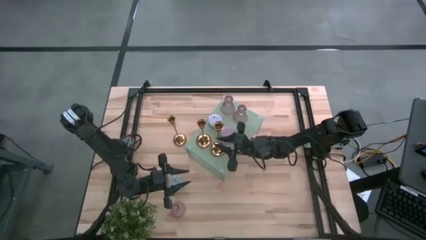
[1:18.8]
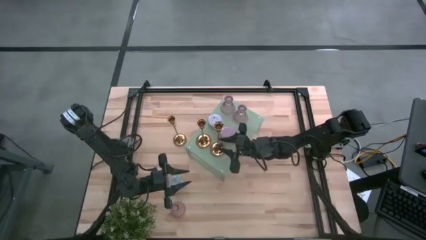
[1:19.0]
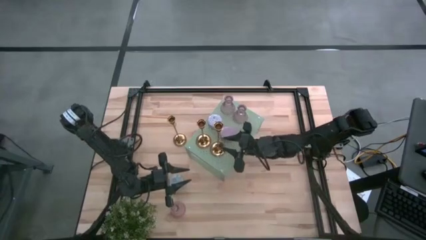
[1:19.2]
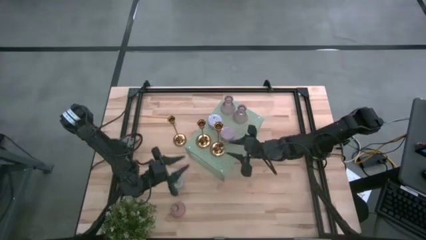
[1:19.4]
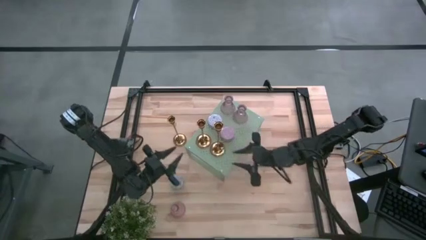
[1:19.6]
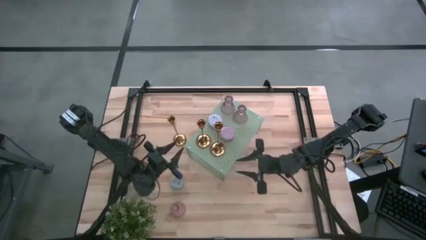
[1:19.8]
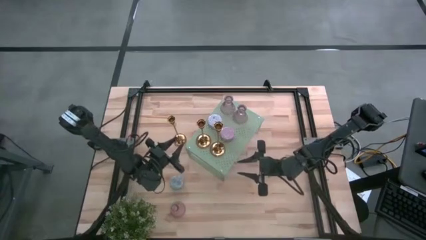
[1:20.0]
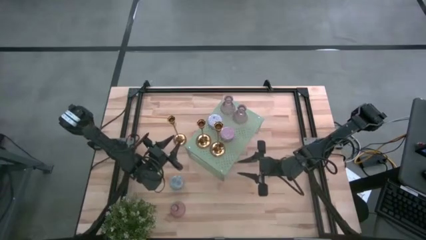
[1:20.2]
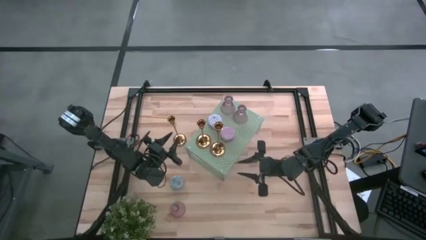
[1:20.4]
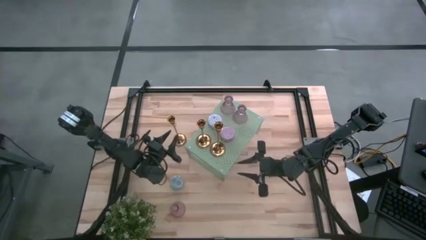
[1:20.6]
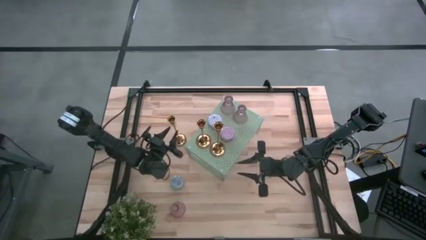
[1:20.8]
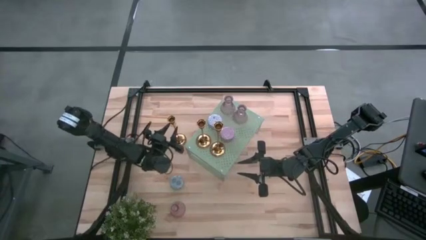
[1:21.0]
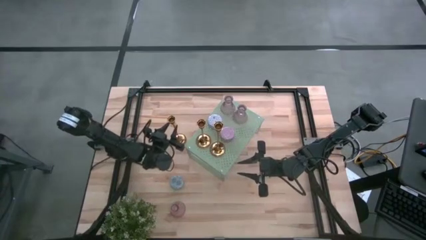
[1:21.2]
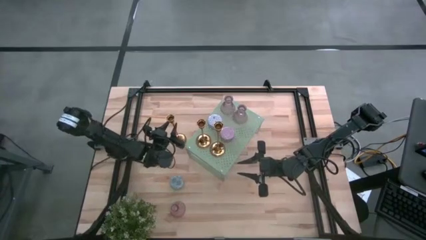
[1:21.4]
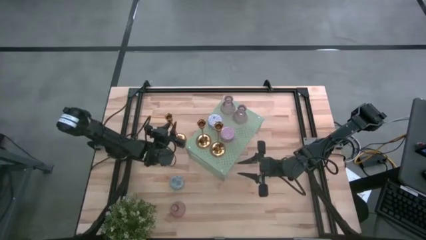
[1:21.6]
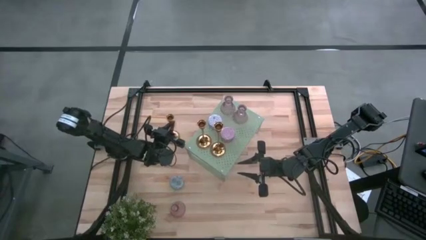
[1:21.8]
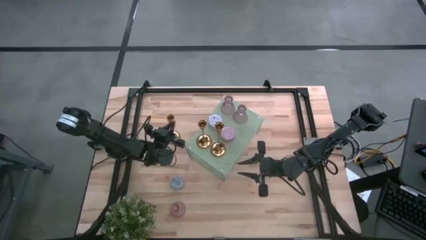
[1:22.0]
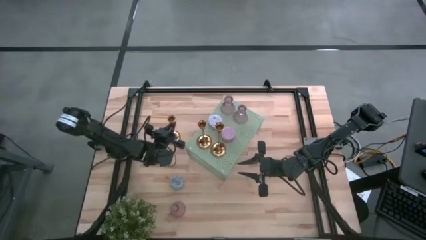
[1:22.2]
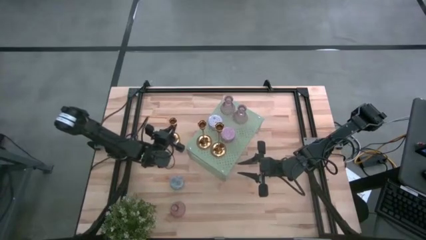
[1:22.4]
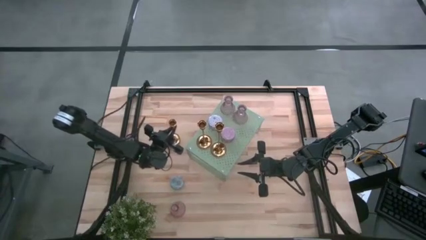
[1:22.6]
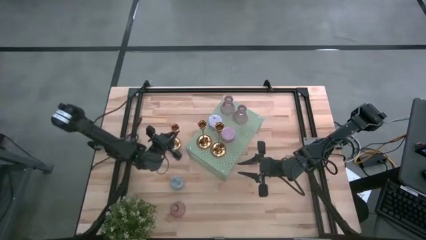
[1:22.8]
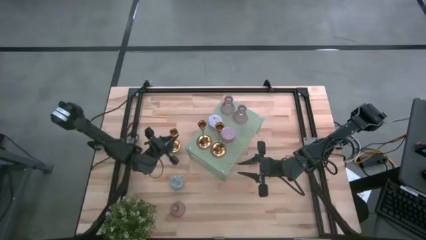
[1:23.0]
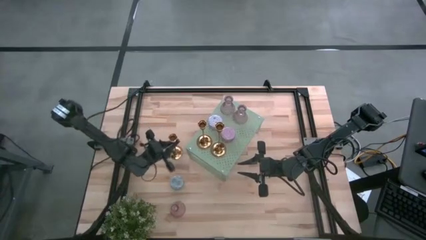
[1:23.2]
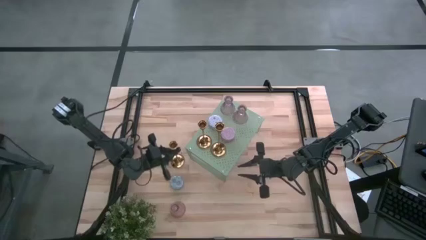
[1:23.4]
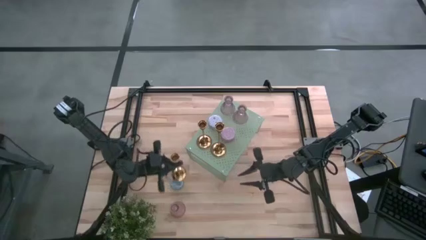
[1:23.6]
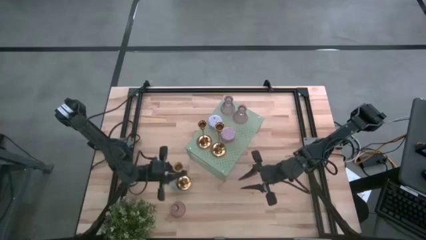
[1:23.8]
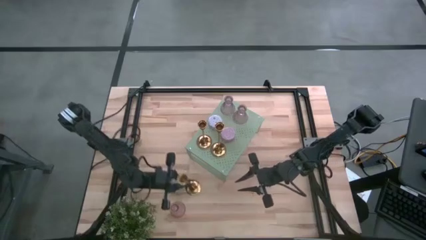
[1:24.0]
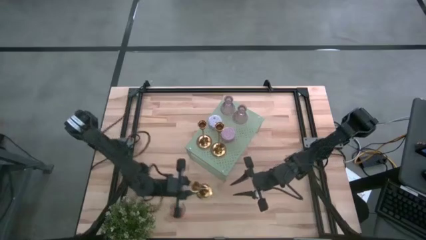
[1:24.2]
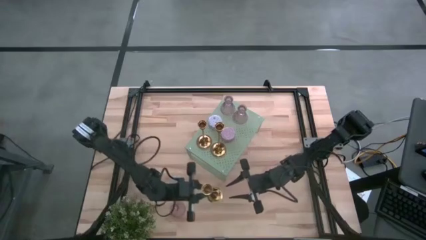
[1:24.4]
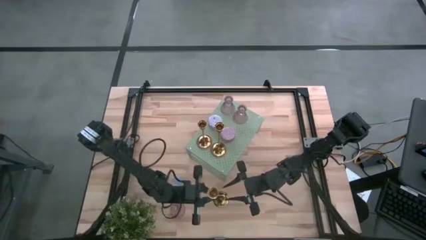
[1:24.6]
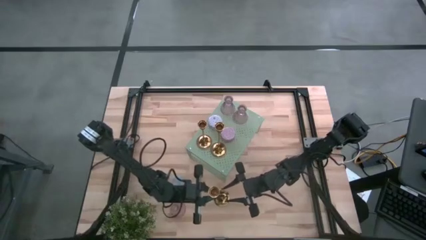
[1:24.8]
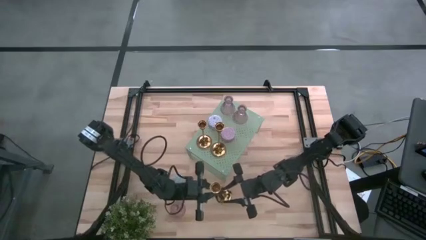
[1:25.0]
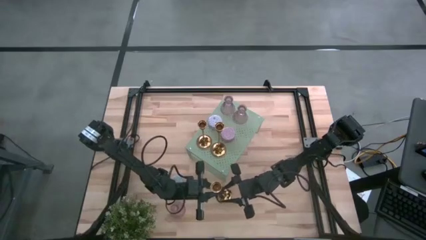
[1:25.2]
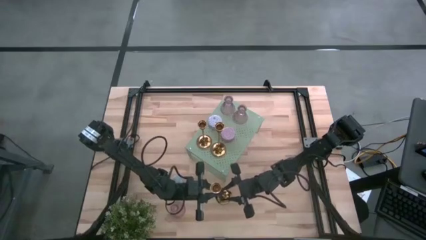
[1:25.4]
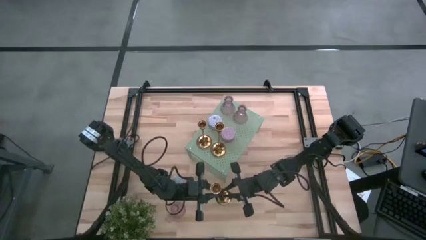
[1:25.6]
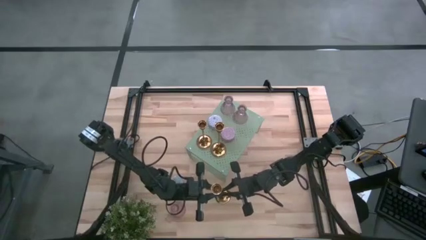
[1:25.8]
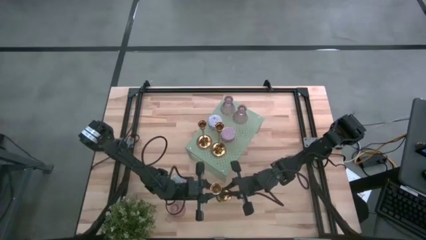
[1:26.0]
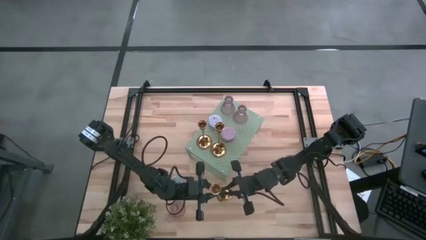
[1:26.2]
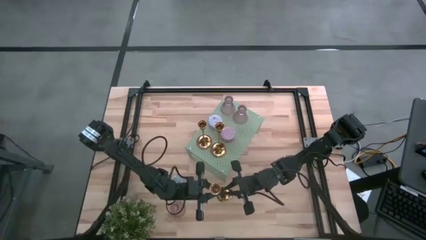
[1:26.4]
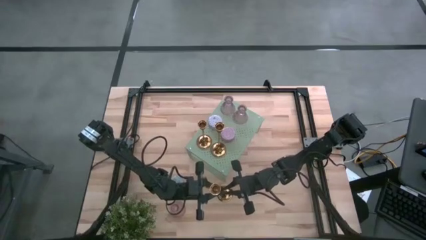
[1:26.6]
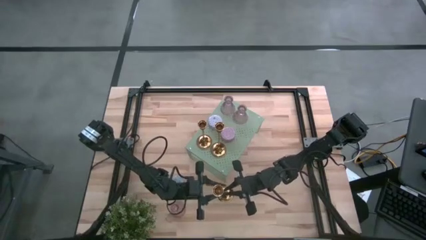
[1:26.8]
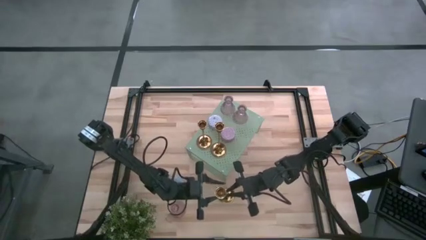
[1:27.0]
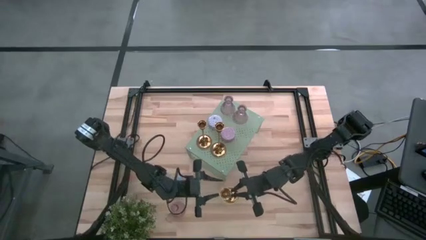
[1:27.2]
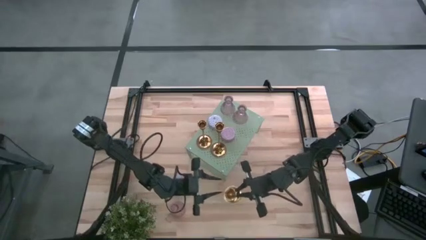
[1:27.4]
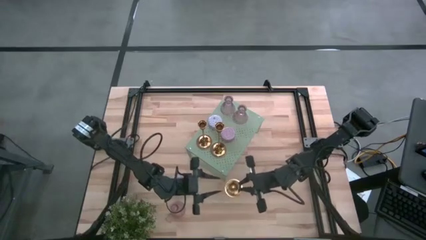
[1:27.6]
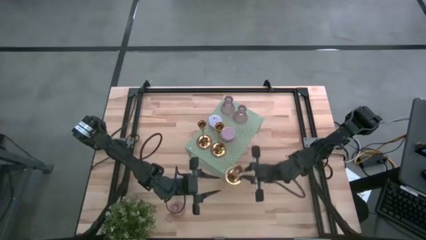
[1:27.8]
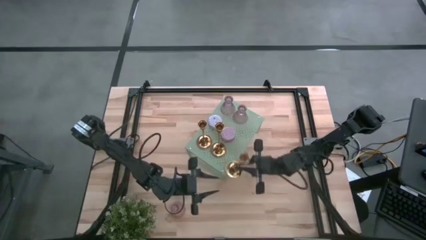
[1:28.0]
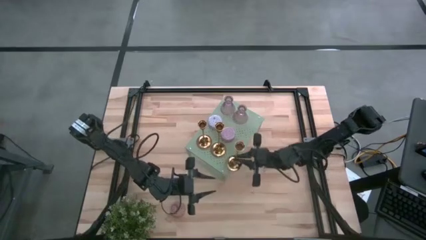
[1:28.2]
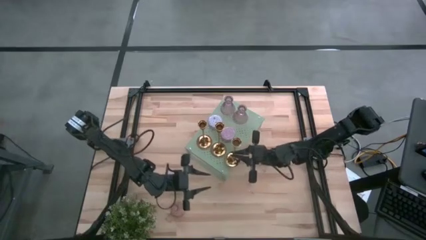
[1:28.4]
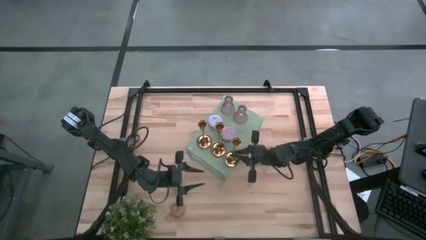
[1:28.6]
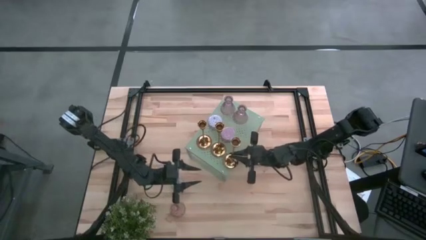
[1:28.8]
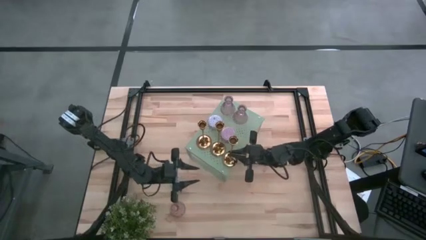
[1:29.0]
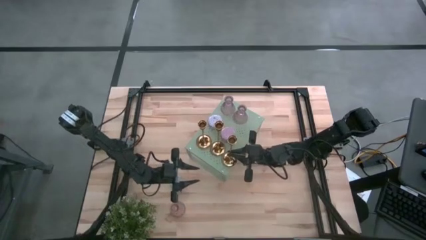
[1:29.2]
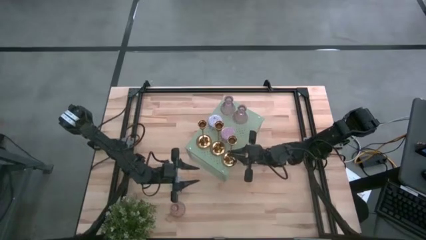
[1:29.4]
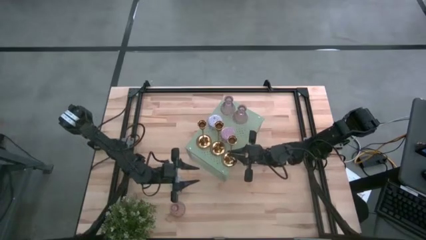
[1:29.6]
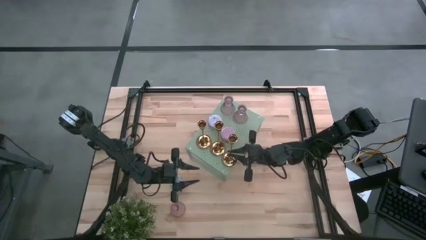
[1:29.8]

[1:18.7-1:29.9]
Task: Pick & Place candle stick holders
Put the gold candle holder aligned with the other gold candle holders on the shelf
